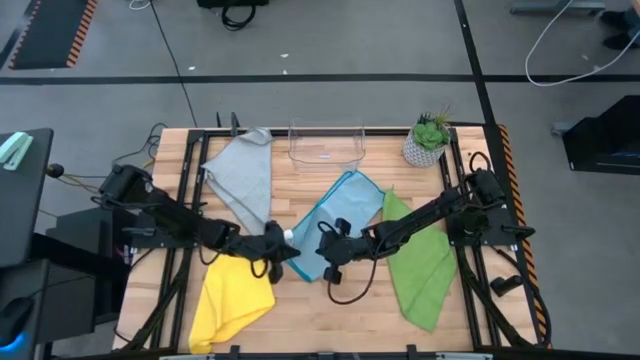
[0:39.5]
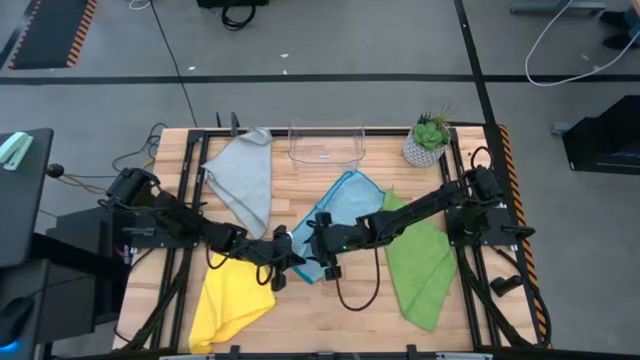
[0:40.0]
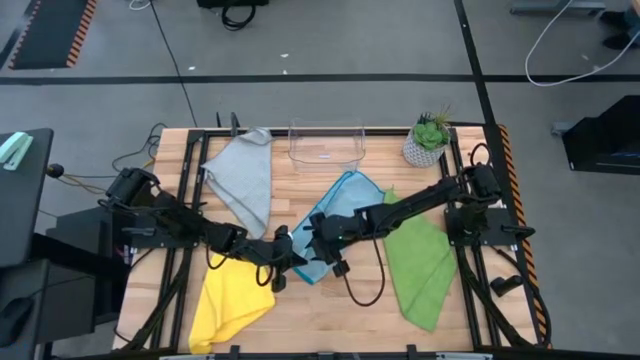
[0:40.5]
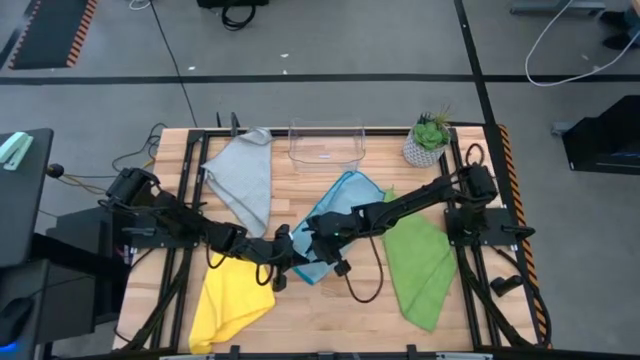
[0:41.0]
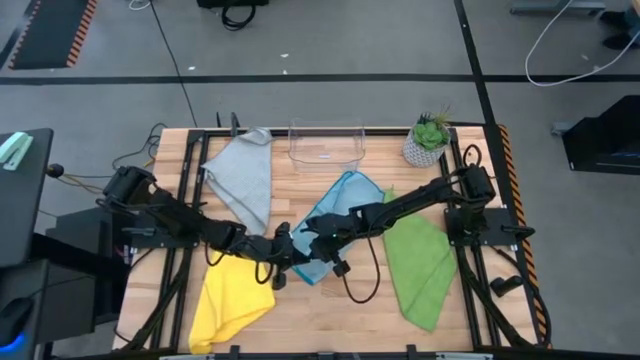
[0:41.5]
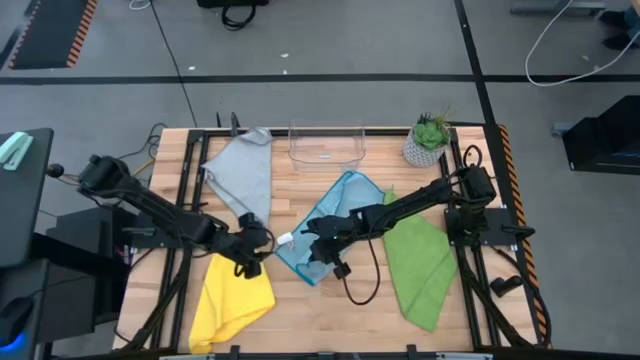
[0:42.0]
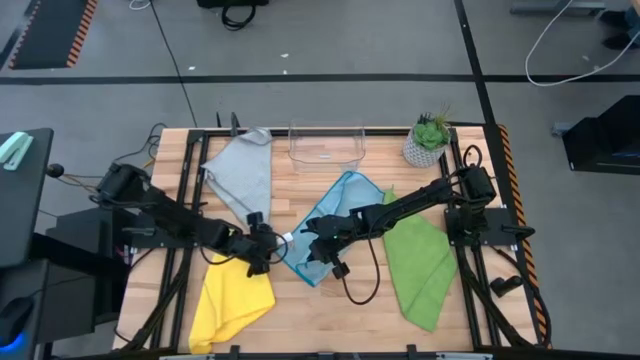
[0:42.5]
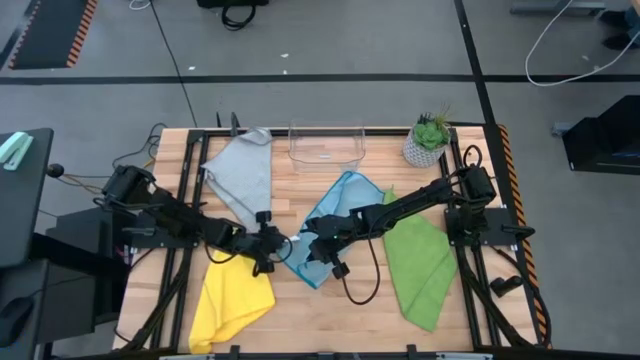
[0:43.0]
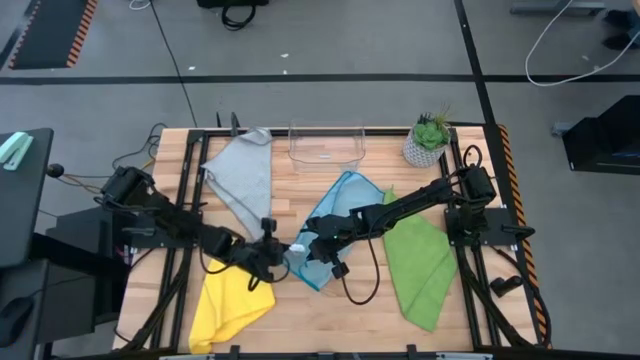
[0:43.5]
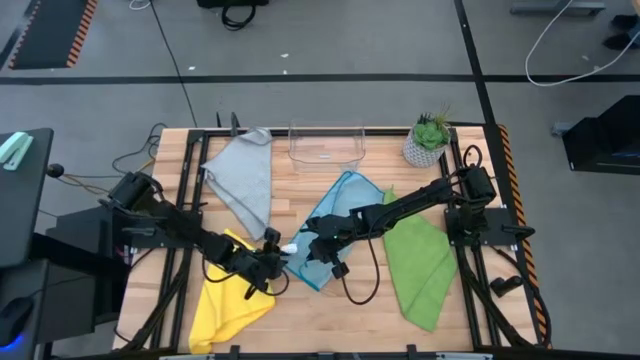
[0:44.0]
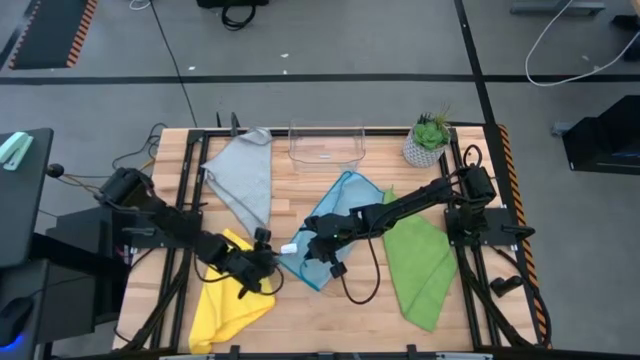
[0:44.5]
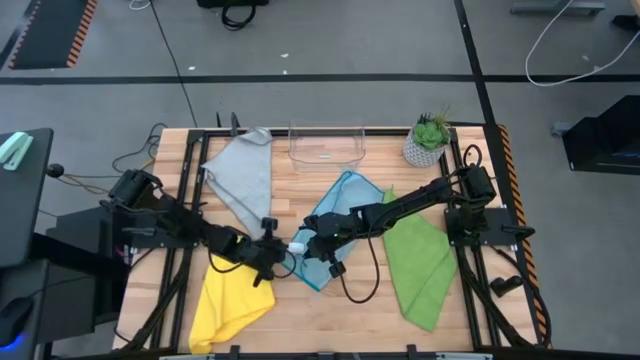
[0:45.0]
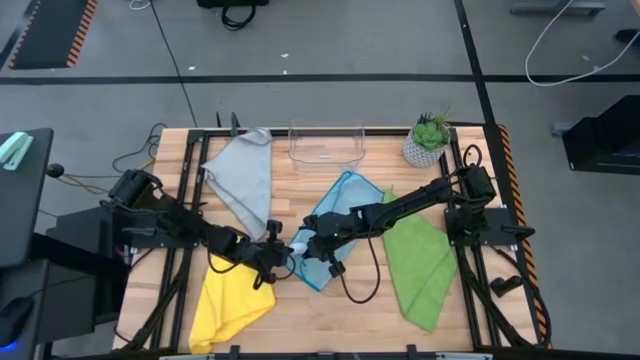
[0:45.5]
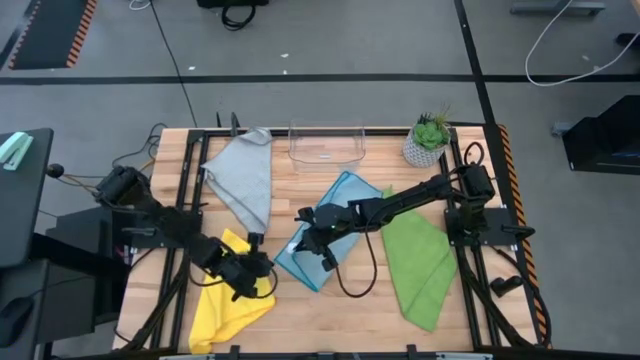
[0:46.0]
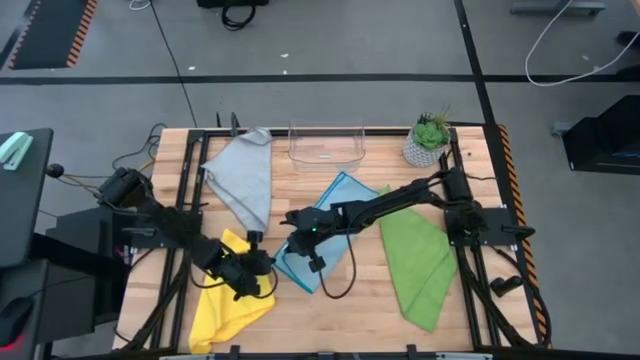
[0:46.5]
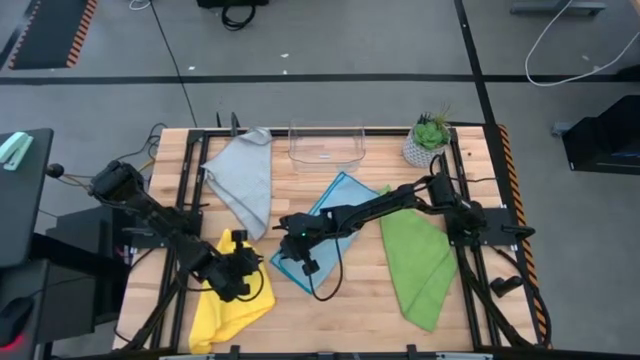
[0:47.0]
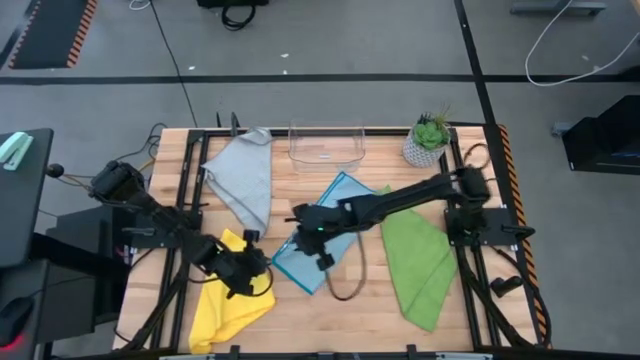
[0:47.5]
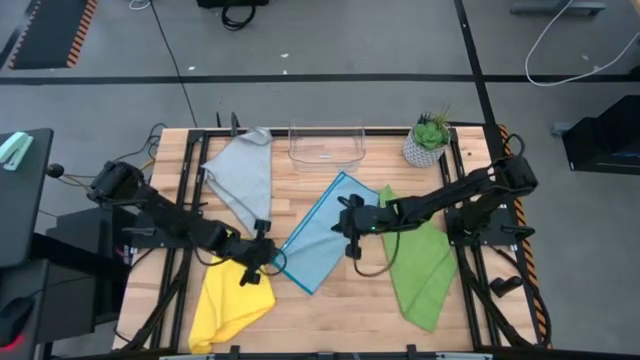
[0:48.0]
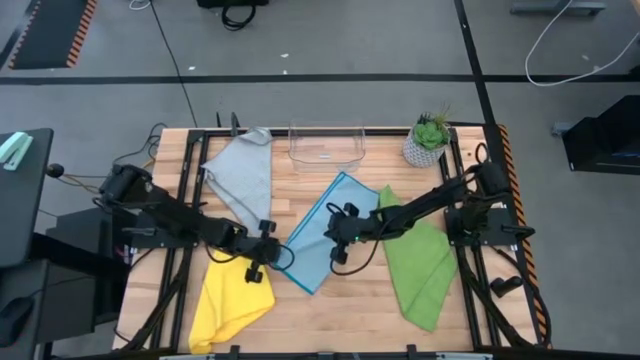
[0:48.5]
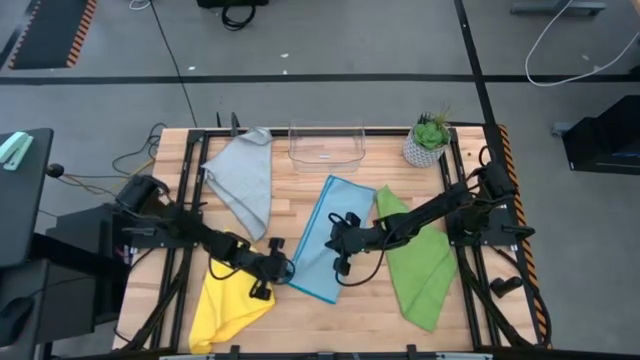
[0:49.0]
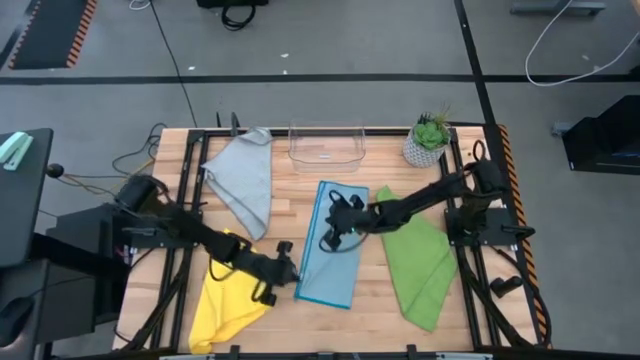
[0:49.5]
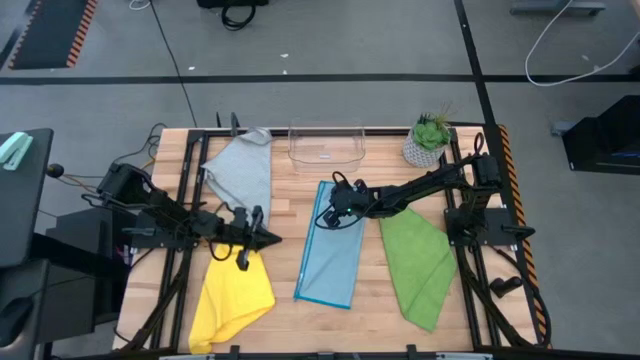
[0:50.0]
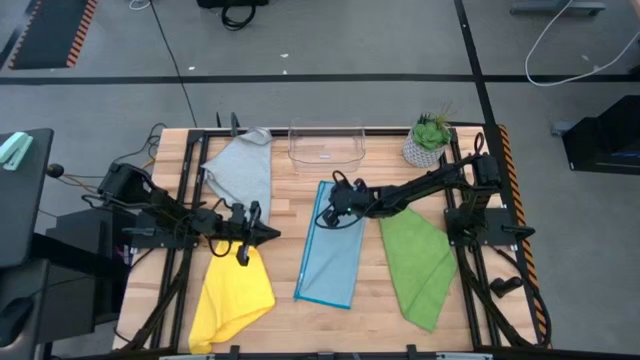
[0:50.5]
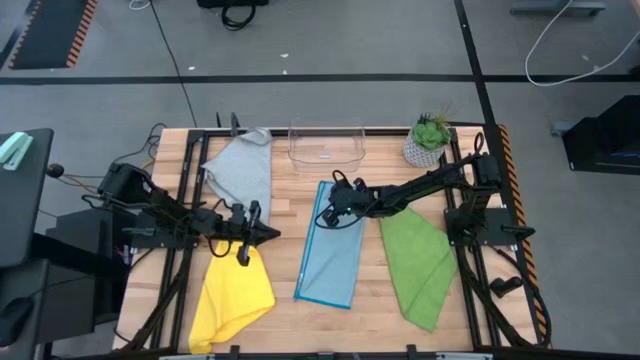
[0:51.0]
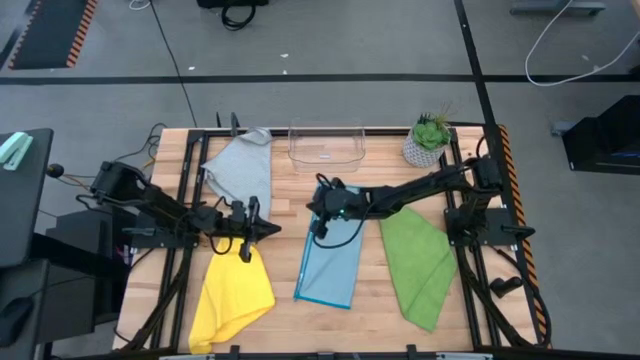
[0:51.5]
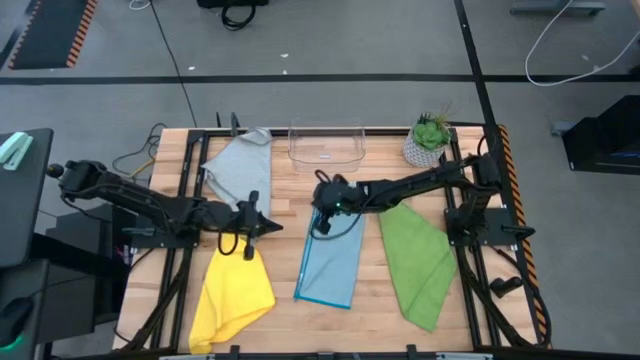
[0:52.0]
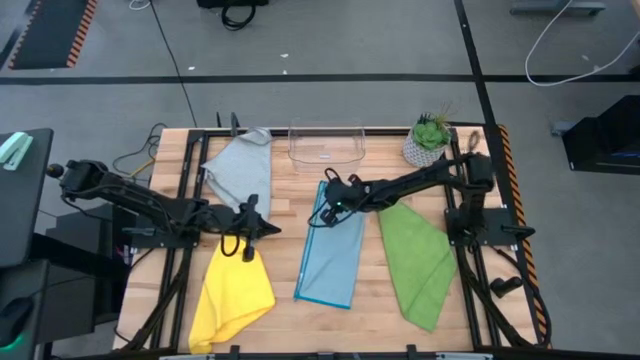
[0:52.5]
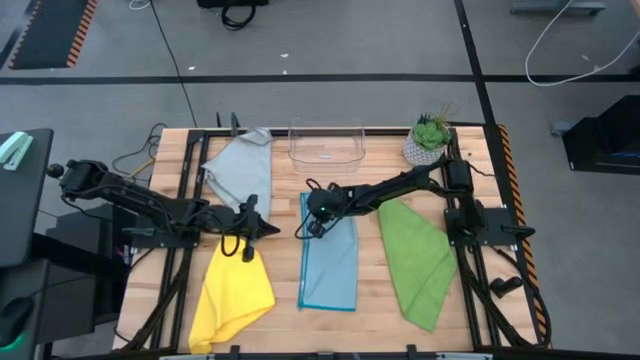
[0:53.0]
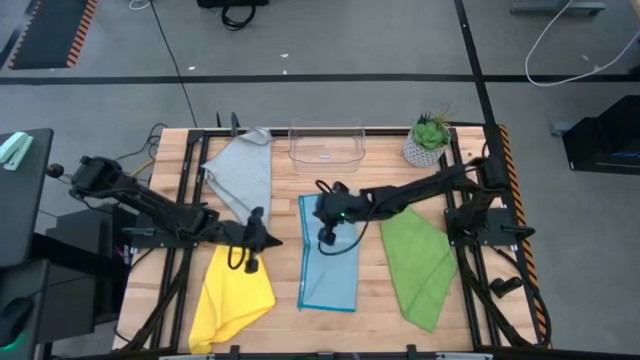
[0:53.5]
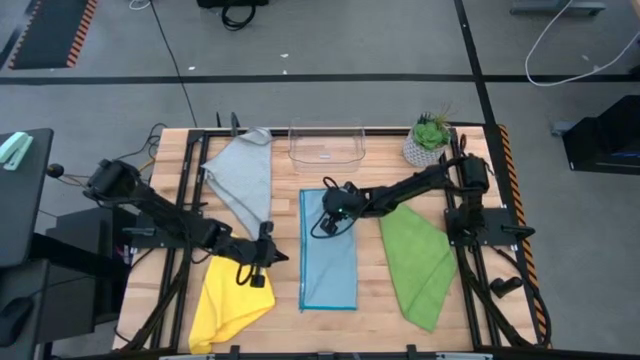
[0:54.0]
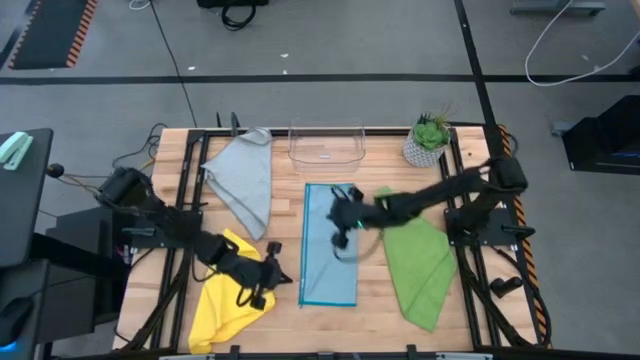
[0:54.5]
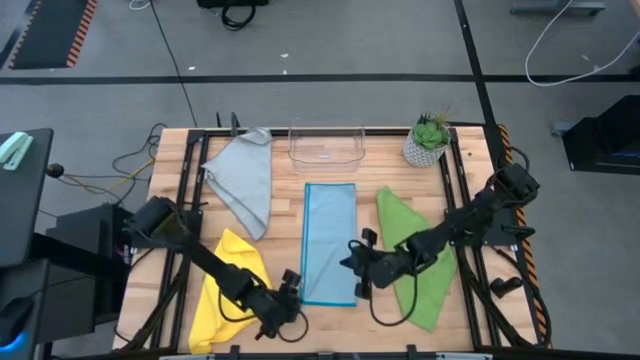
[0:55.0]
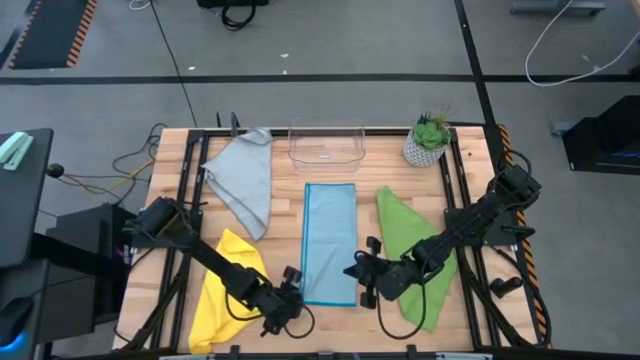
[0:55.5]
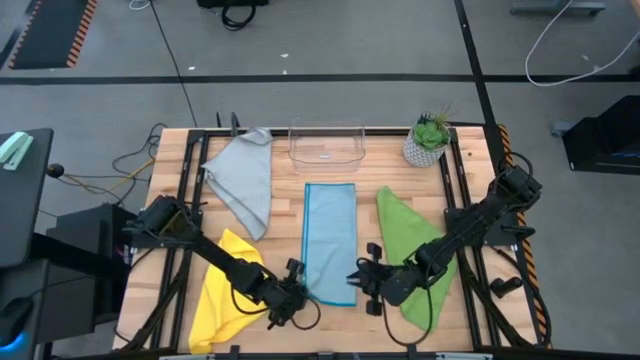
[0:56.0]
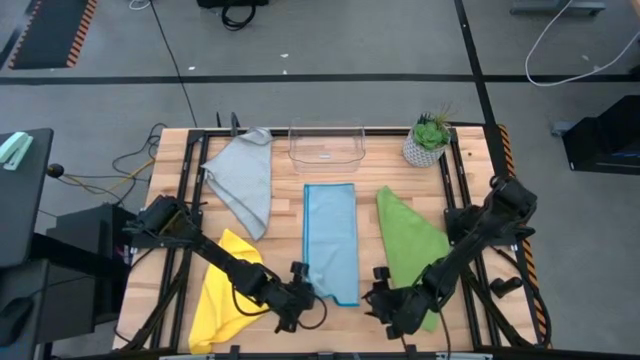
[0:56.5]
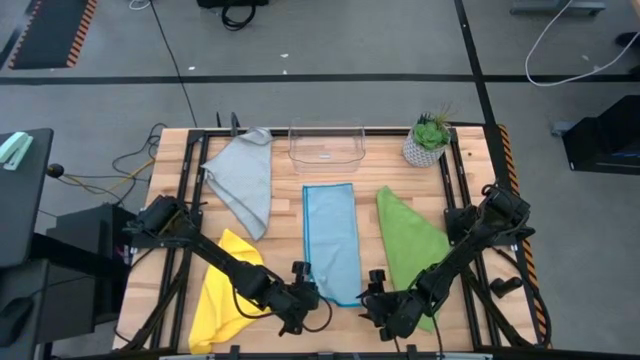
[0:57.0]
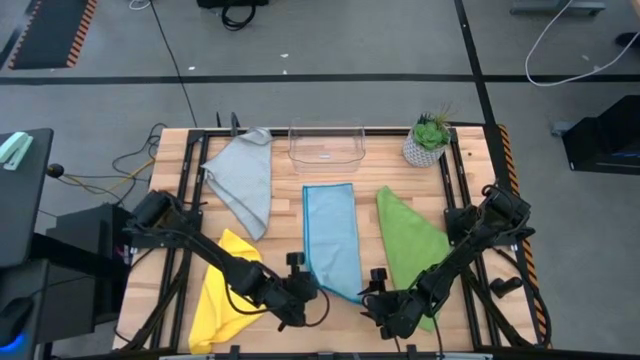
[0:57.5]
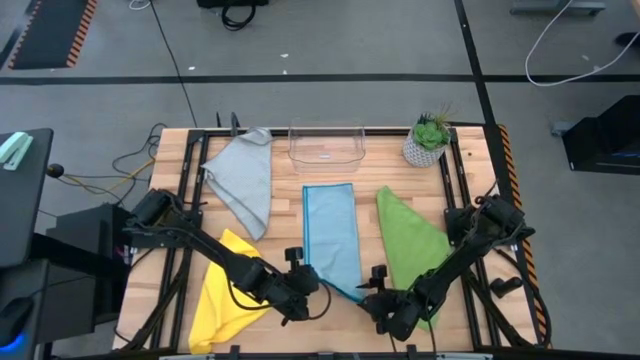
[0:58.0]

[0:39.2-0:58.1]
Task: Fold microfiber towels
Fold the blue microfiber towel
